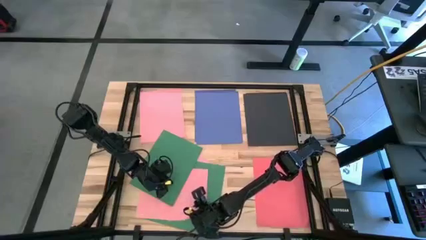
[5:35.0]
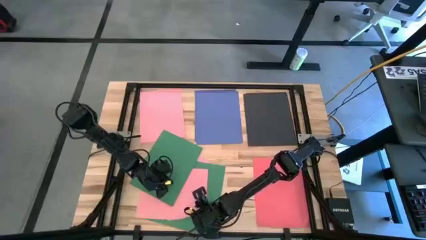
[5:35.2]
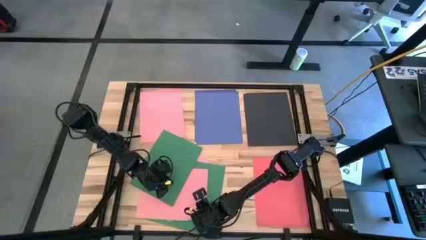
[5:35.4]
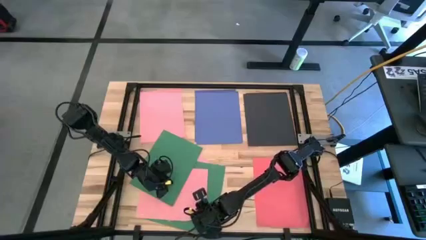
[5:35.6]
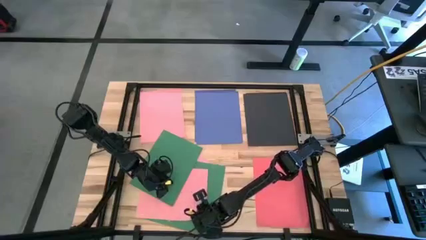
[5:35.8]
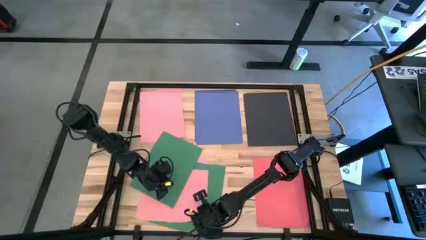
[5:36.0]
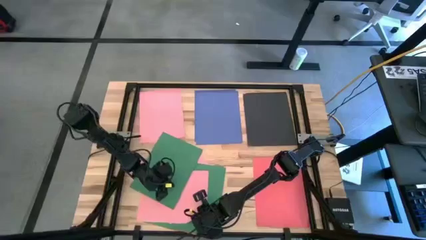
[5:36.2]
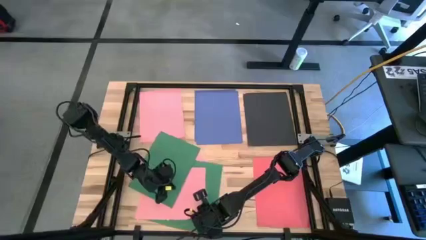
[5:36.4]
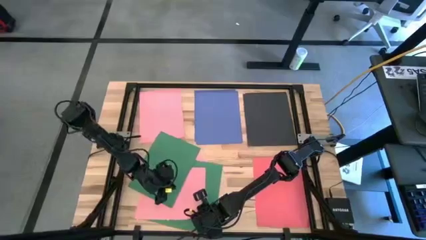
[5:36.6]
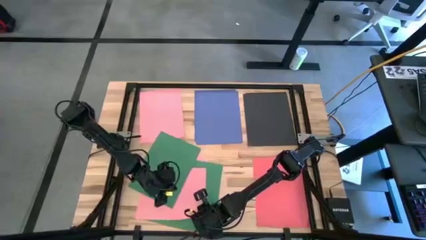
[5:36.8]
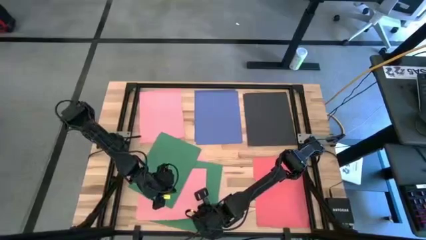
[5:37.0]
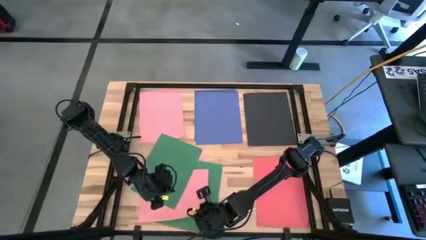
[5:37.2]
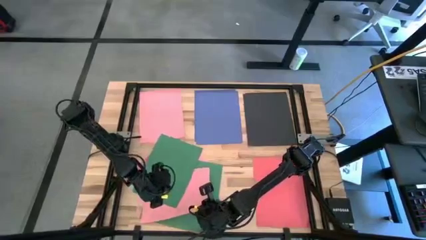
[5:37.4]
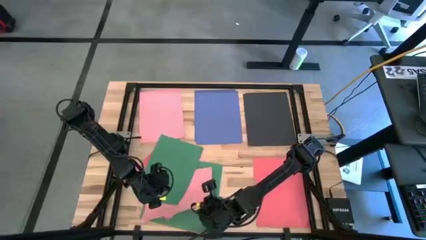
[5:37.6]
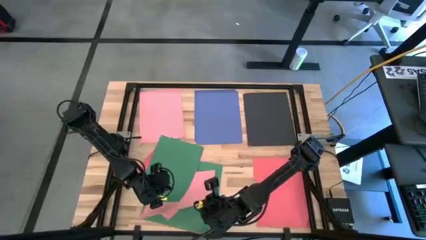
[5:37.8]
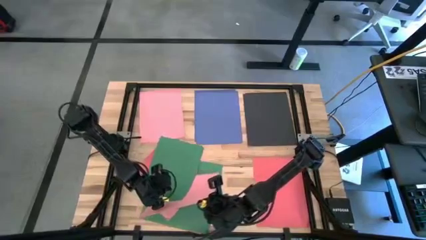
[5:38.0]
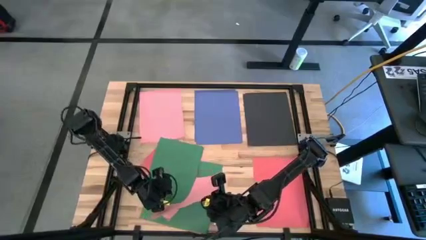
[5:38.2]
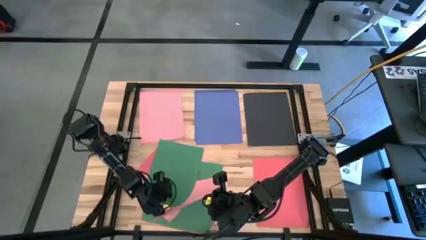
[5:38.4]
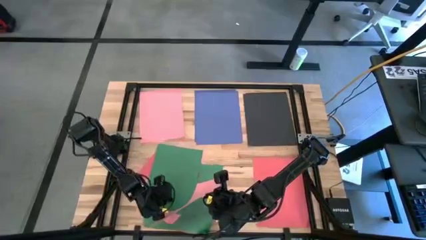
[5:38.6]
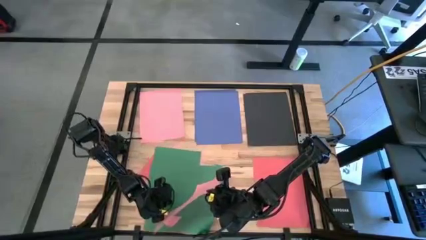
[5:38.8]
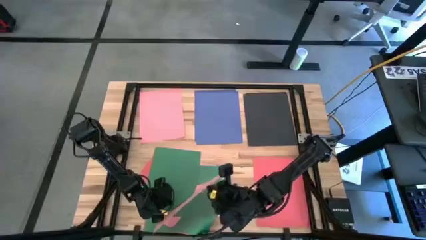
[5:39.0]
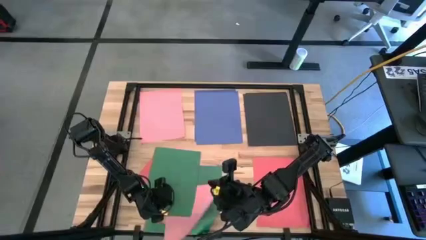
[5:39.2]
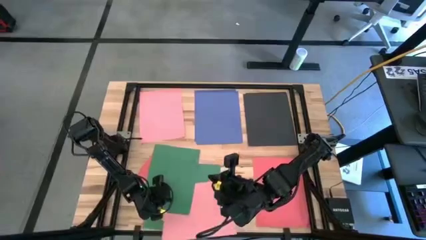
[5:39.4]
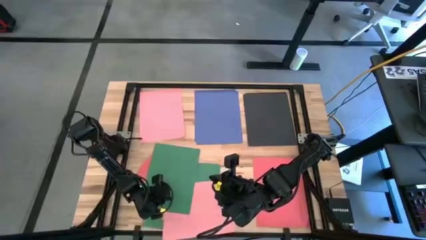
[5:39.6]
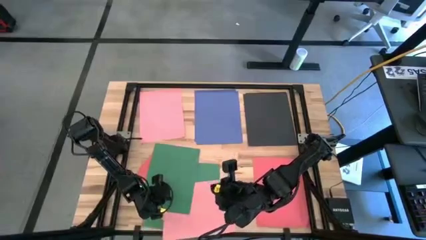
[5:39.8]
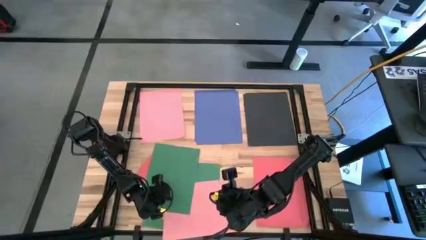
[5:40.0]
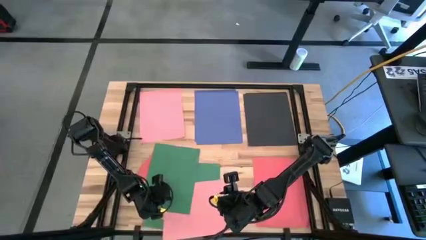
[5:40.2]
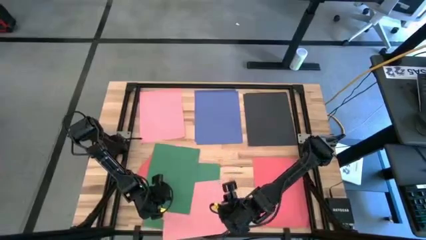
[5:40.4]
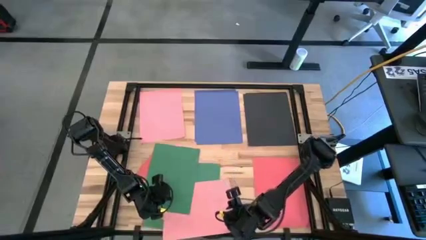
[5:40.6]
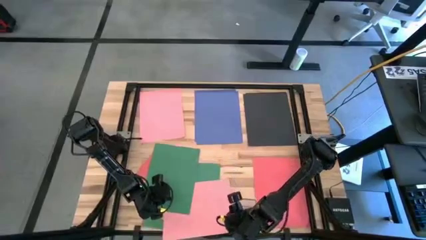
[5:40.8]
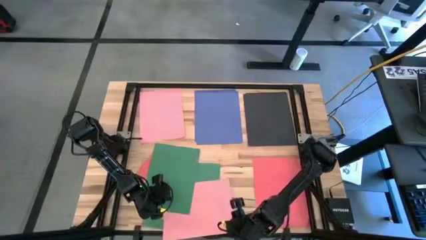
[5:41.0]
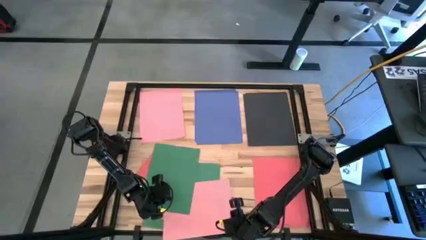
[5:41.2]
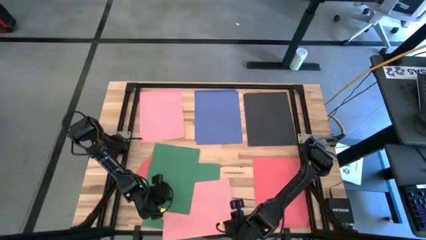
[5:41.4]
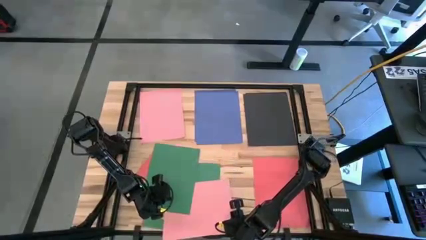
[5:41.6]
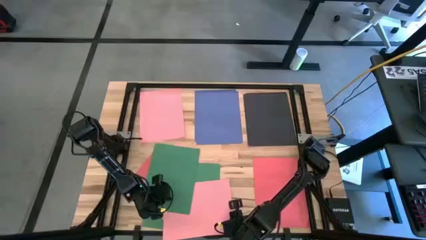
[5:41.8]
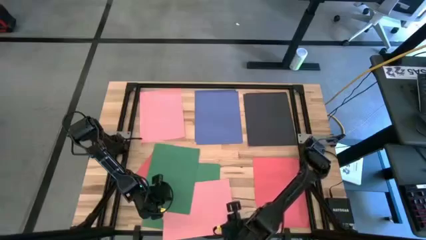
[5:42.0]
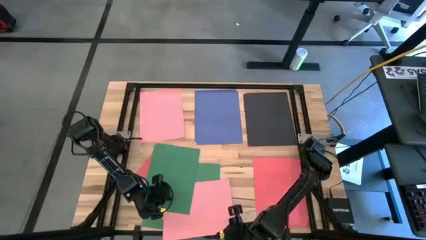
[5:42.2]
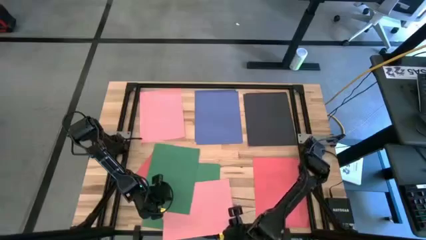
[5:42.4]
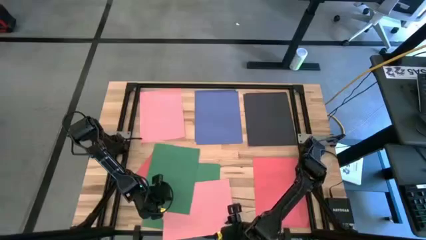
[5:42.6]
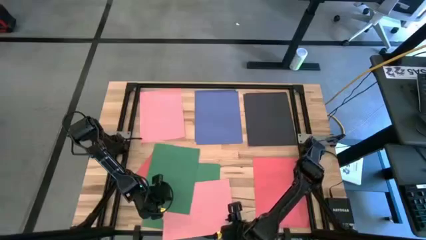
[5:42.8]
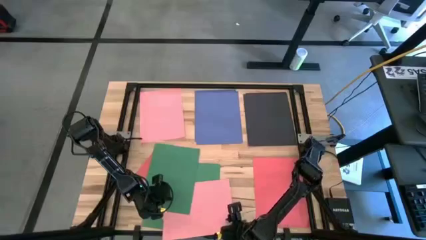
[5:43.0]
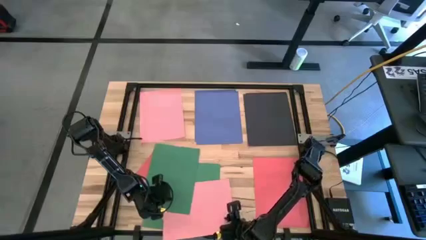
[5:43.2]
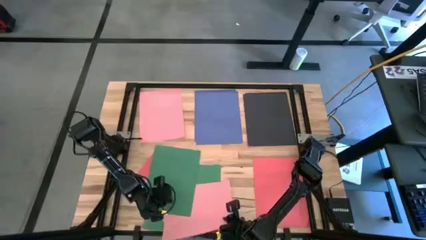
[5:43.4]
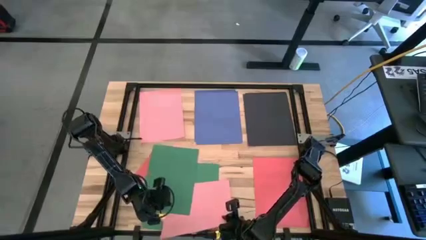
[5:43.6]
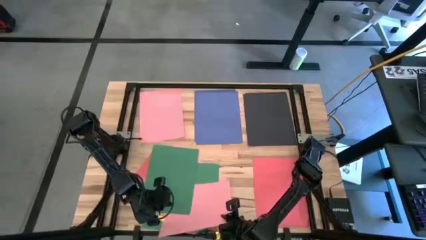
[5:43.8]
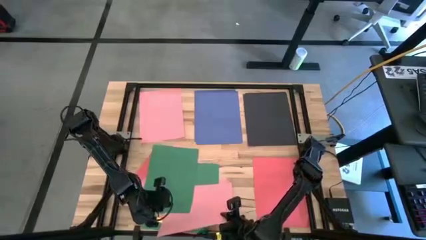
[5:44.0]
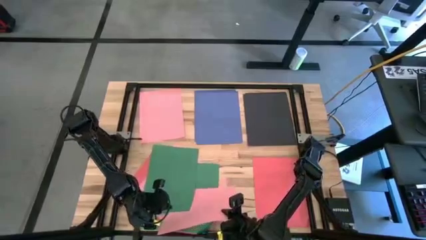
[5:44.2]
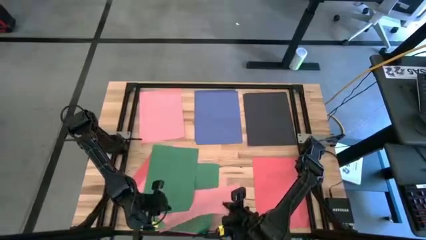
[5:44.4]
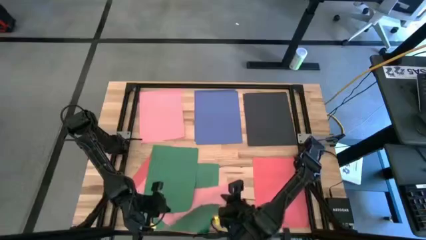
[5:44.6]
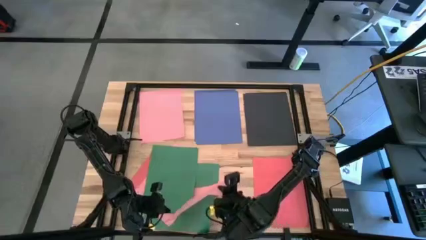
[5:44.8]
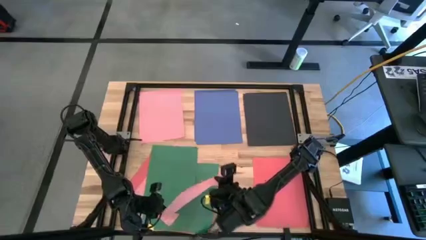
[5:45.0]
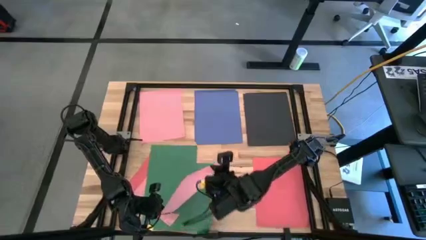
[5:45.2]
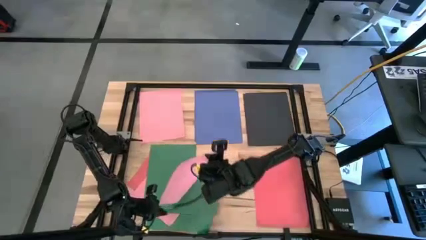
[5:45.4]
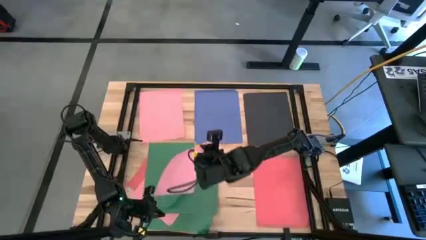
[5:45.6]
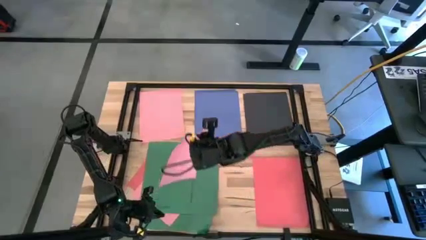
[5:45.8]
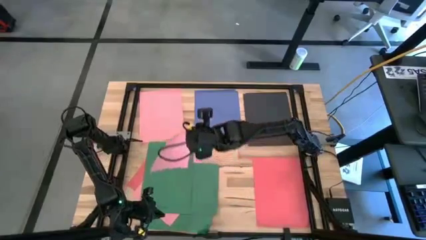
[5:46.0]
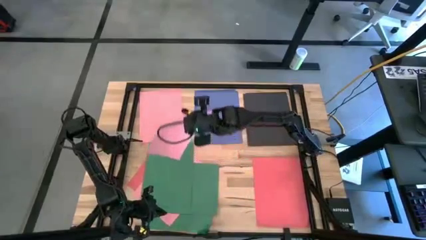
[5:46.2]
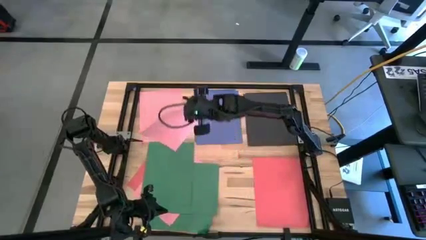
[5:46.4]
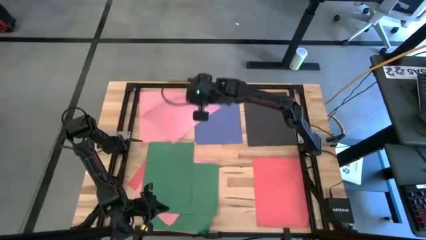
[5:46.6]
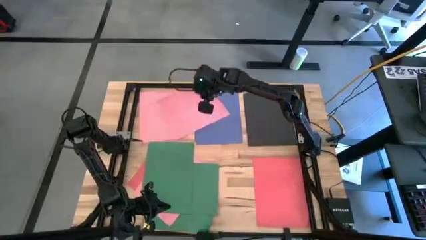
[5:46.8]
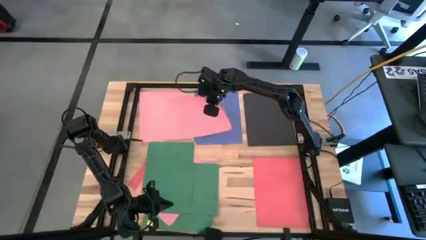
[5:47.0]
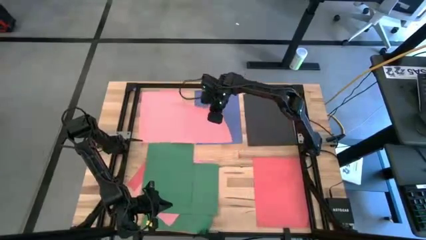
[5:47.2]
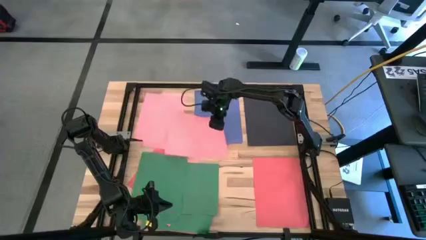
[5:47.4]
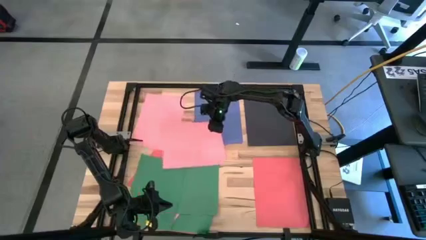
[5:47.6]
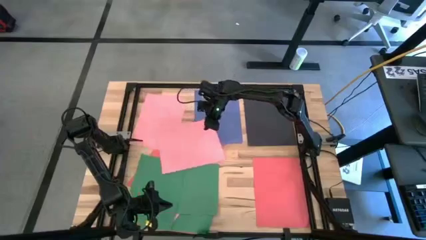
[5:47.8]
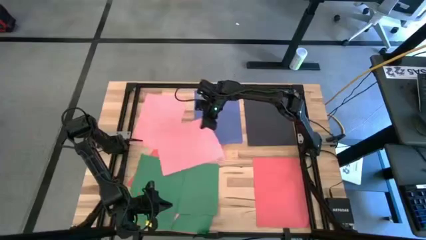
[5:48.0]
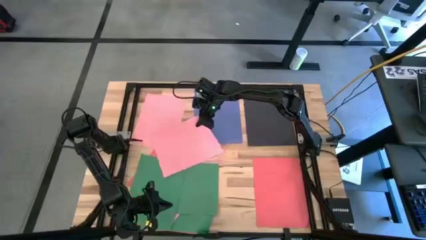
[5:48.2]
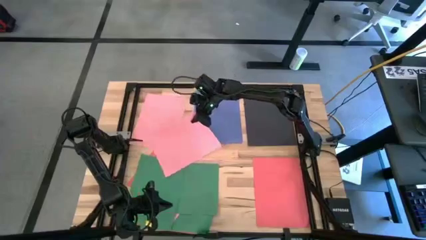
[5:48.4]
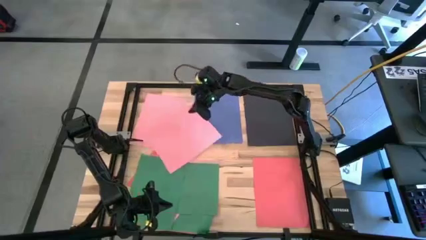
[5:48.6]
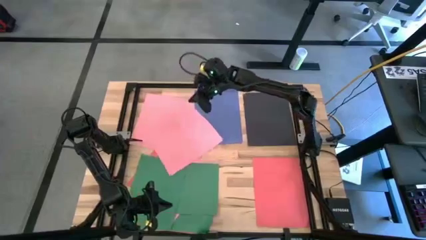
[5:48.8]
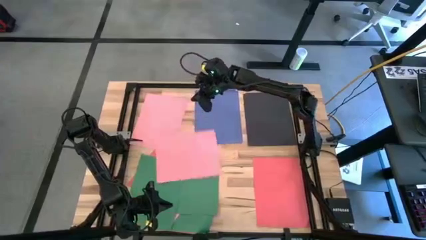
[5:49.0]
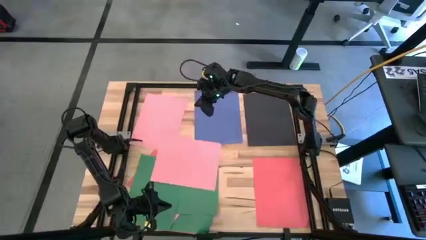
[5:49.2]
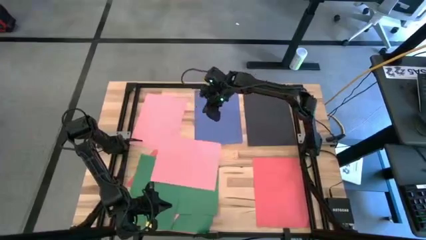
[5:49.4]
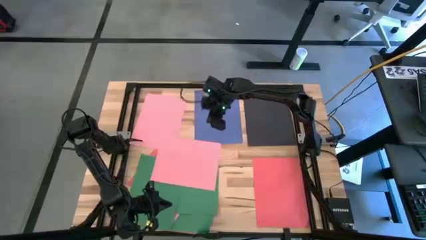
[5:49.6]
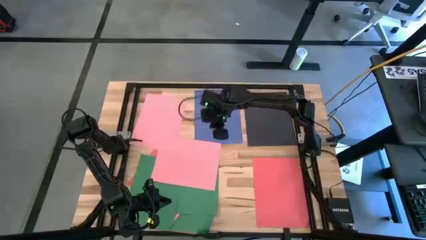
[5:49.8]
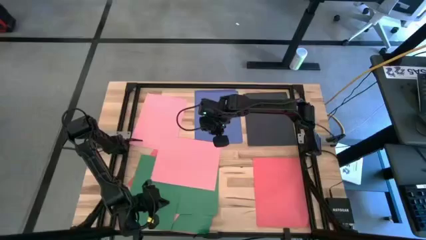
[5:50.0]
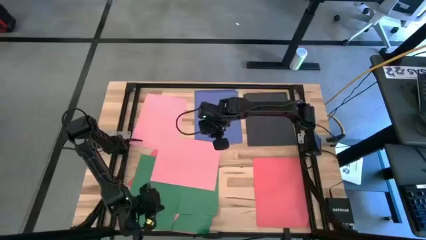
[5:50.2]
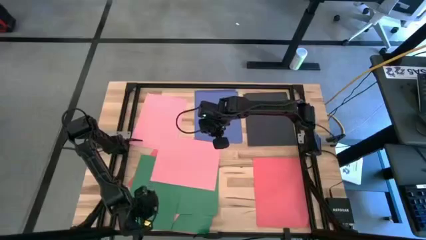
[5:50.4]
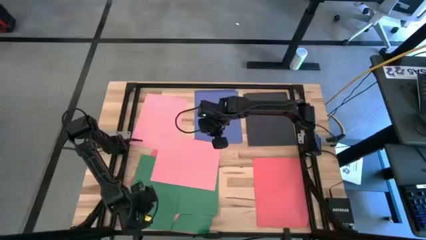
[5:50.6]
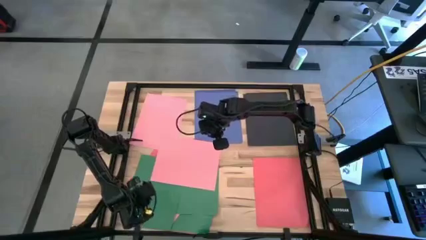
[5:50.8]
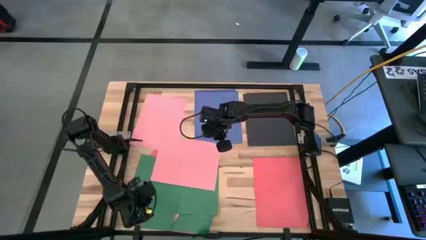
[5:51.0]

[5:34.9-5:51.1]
Task: Organize paper
Stack the pink paper on top of the other pink paper on the table
